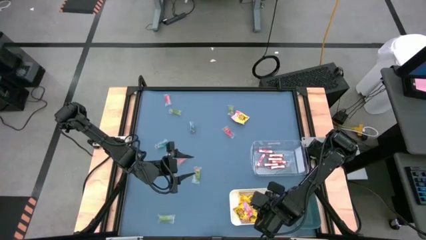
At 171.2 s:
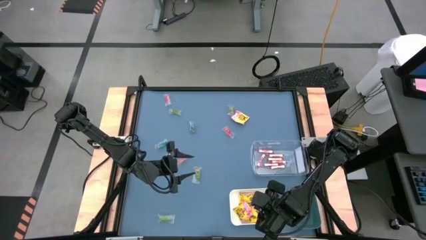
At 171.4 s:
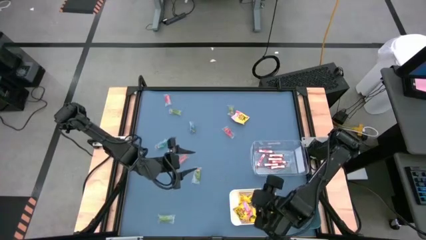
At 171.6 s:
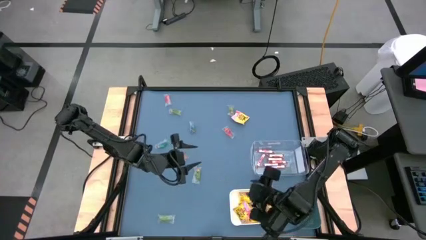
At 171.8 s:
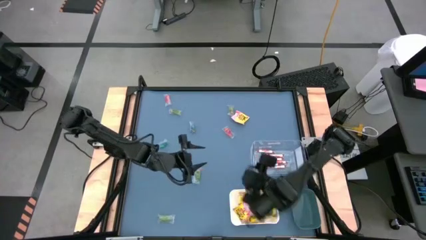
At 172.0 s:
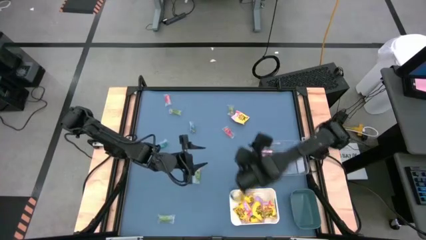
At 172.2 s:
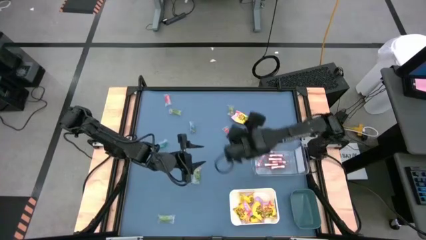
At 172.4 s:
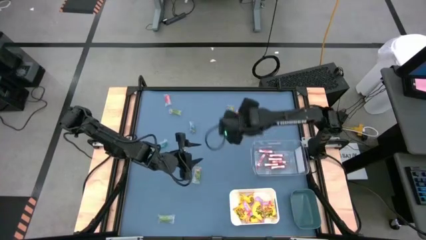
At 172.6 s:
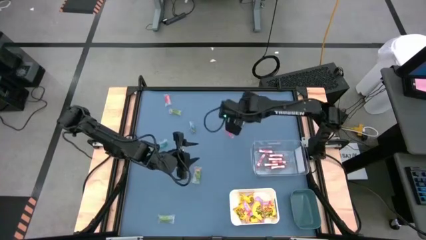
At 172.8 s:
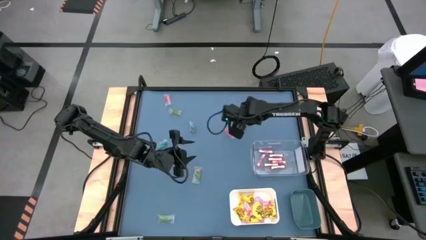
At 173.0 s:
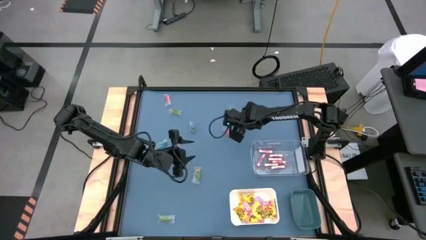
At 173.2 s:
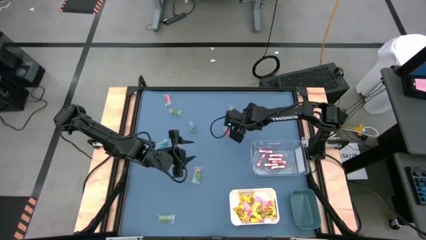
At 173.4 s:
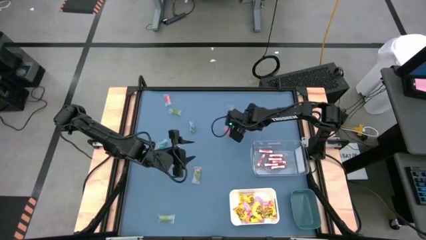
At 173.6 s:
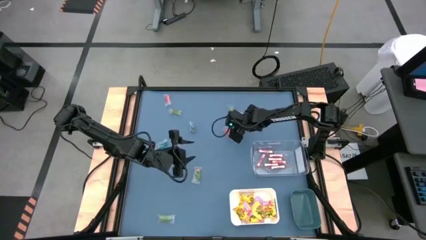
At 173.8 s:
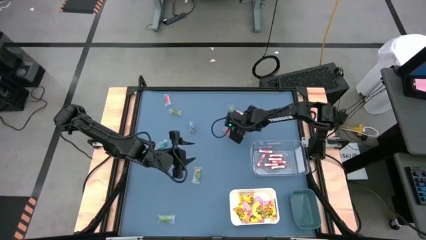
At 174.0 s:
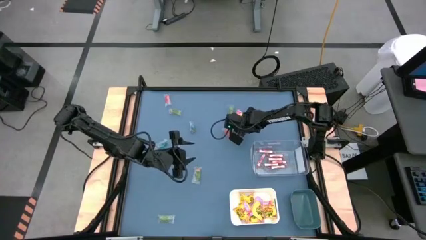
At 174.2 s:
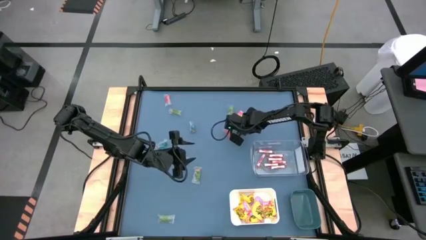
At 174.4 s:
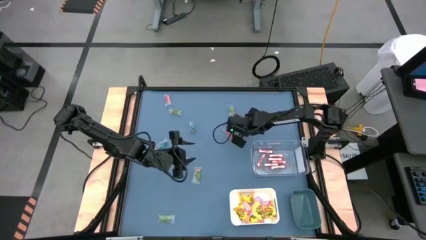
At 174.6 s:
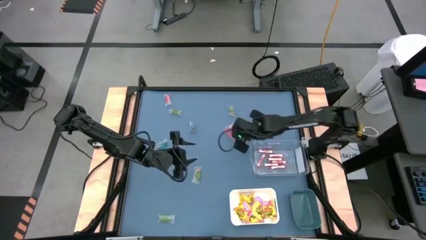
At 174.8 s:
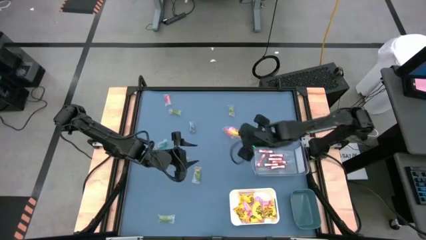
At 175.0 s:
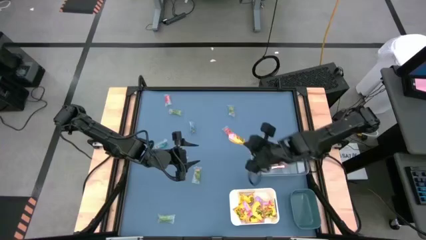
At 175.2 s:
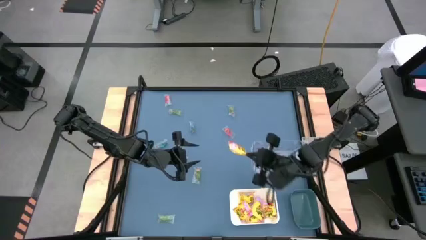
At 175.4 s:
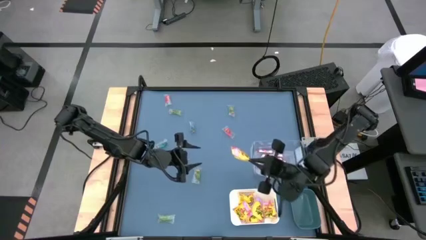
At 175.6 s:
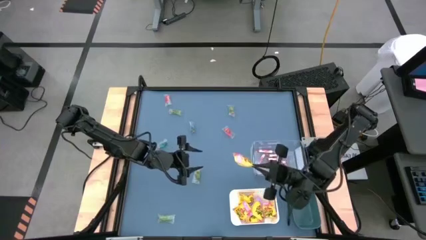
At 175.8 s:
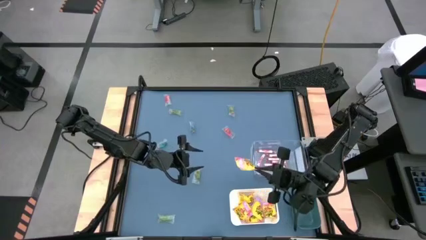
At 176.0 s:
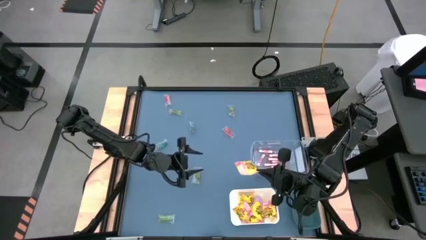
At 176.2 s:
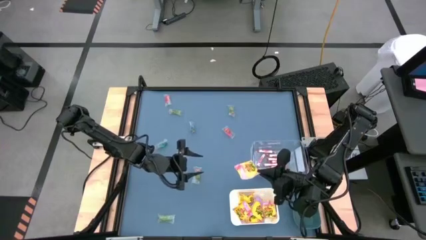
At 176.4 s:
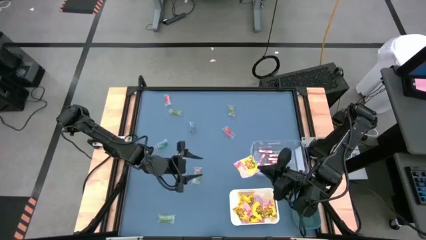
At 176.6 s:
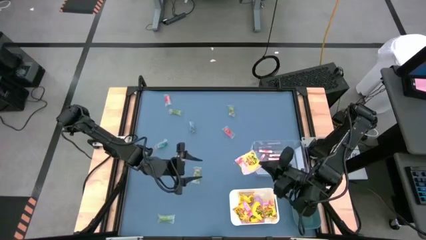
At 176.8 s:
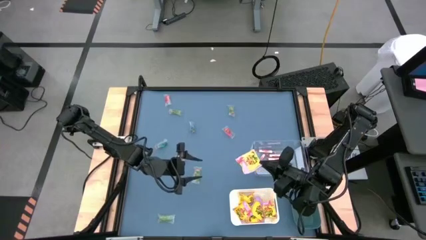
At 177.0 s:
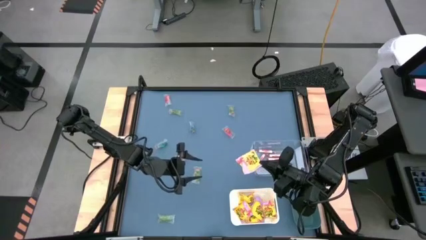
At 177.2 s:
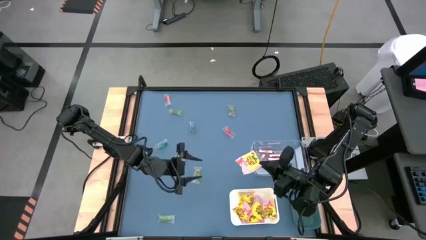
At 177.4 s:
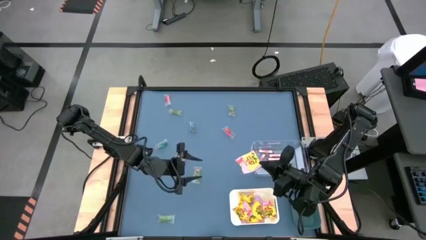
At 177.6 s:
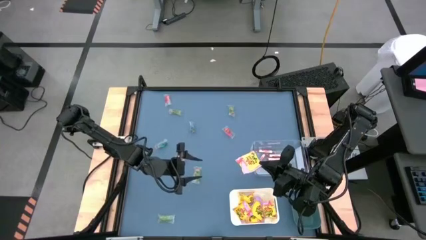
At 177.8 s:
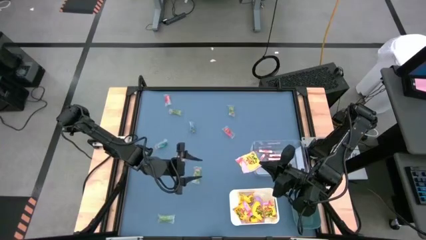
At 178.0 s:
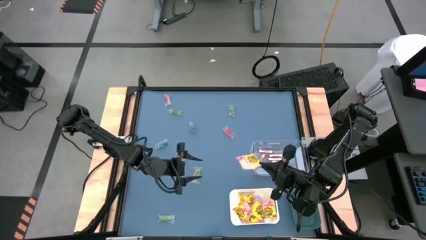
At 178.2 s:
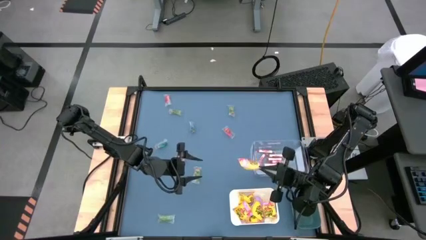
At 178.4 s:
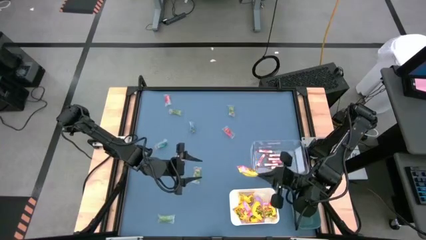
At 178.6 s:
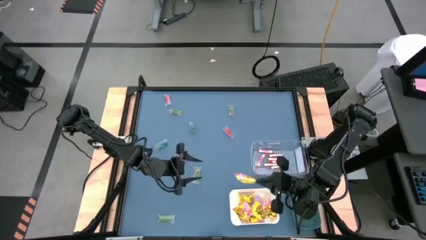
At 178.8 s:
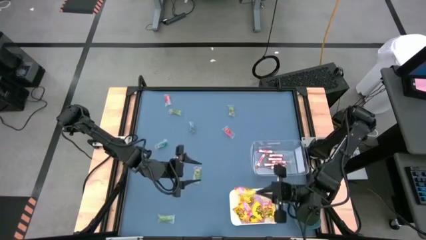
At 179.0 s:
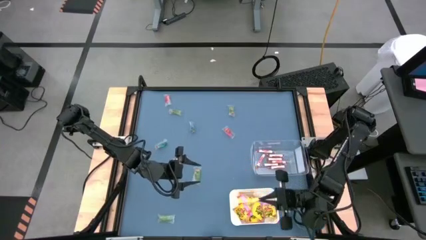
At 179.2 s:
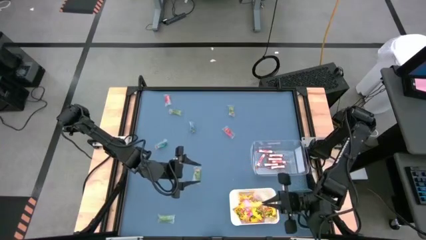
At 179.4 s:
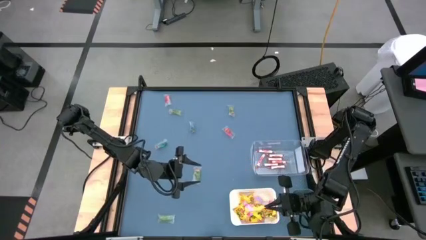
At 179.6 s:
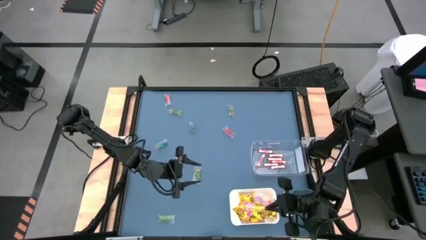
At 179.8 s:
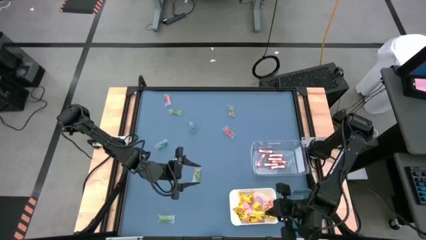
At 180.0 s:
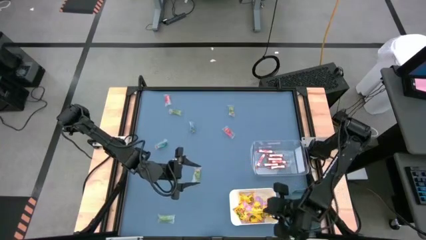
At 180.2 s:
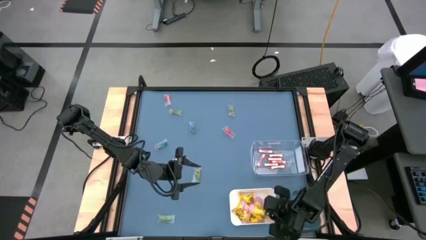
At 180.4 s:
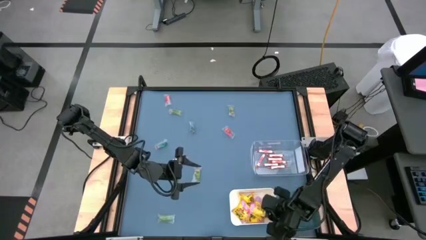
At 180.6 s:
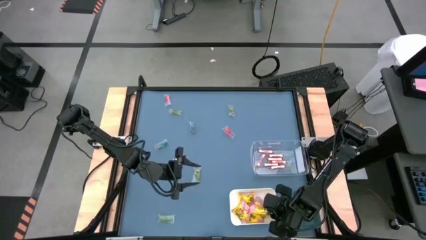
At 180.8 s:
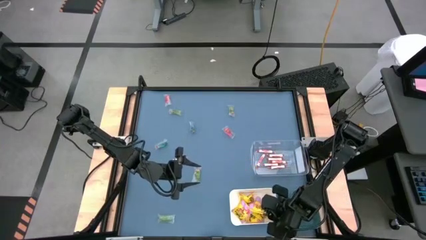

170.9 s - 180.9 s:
Task: Sort candy
Put the yellow candy into the white bin

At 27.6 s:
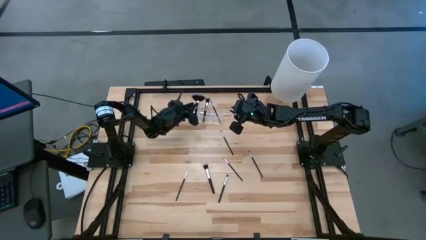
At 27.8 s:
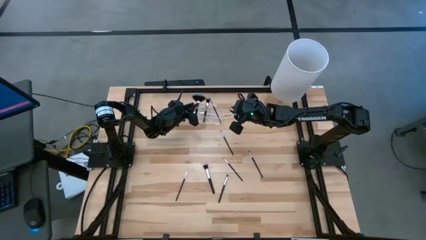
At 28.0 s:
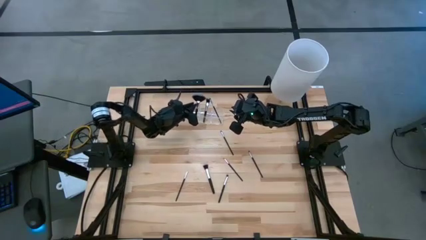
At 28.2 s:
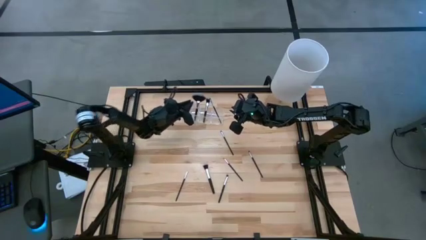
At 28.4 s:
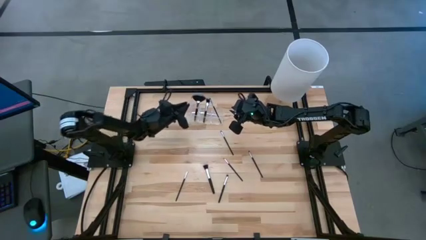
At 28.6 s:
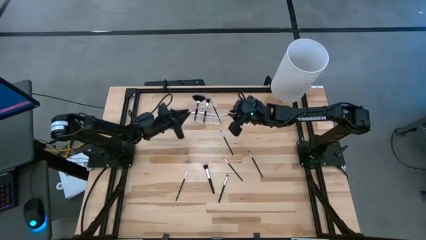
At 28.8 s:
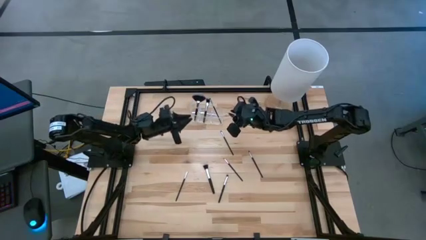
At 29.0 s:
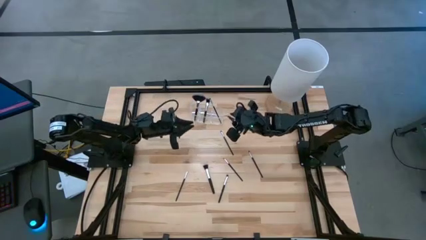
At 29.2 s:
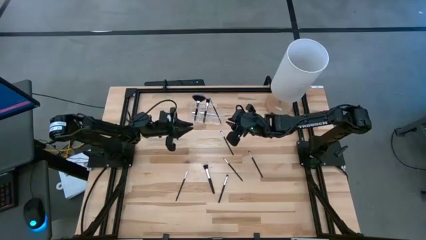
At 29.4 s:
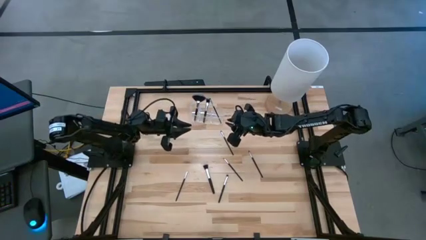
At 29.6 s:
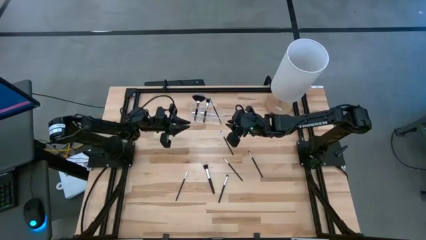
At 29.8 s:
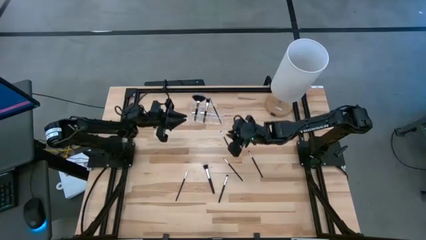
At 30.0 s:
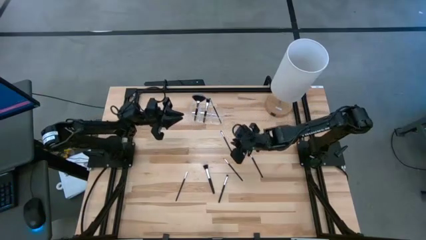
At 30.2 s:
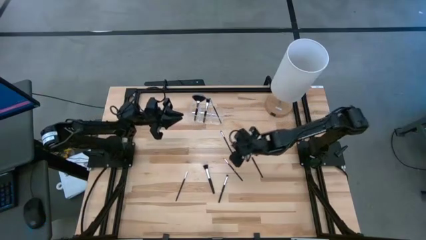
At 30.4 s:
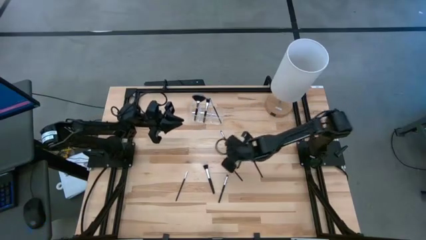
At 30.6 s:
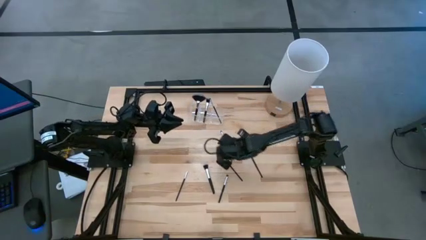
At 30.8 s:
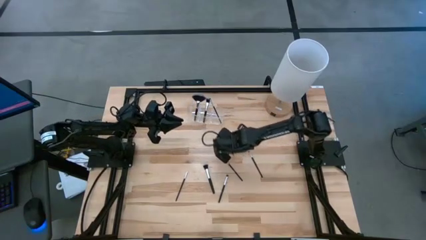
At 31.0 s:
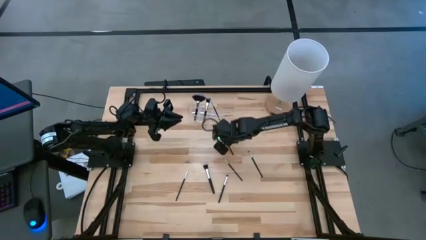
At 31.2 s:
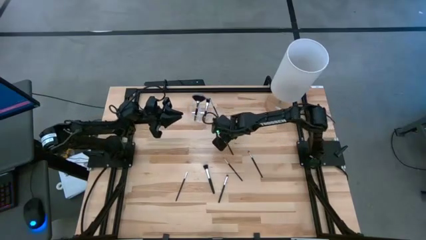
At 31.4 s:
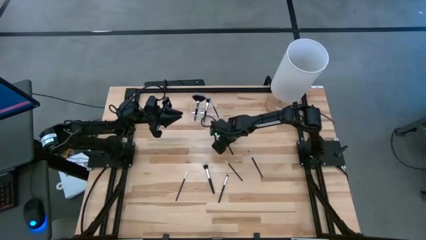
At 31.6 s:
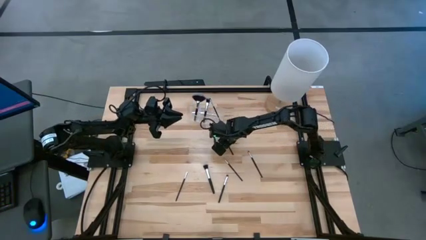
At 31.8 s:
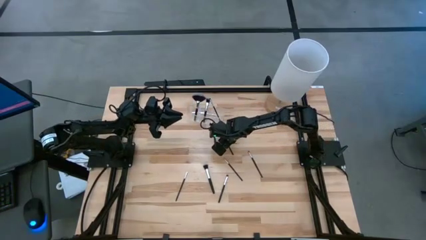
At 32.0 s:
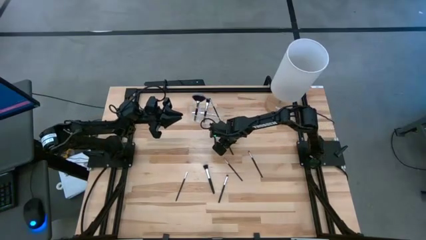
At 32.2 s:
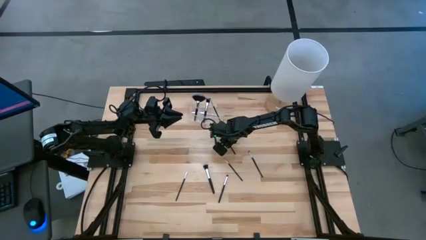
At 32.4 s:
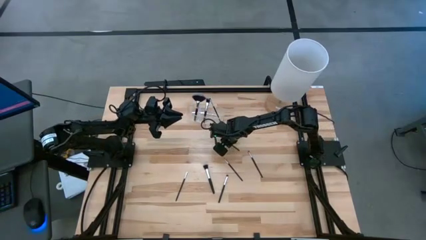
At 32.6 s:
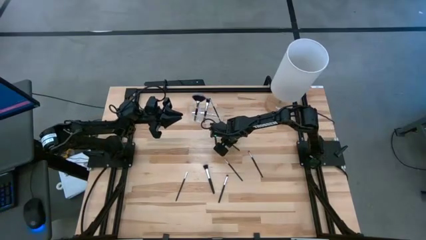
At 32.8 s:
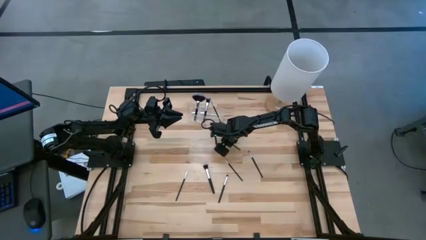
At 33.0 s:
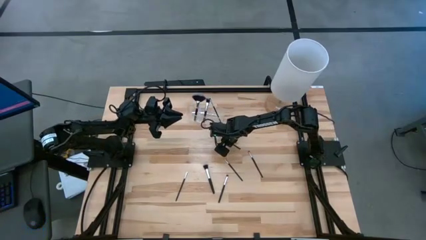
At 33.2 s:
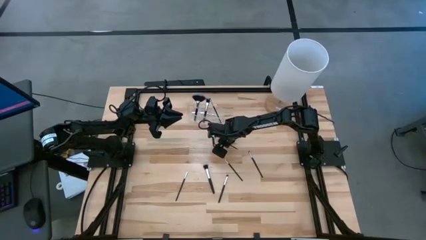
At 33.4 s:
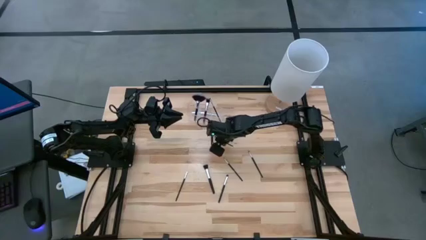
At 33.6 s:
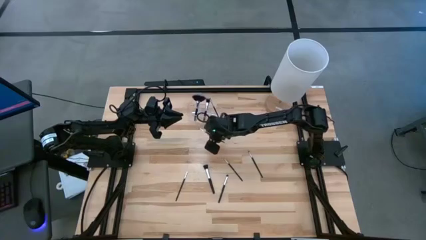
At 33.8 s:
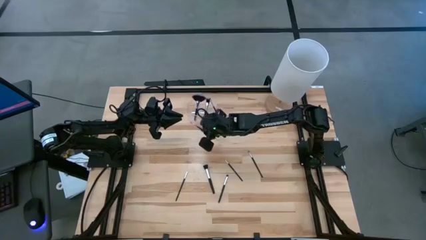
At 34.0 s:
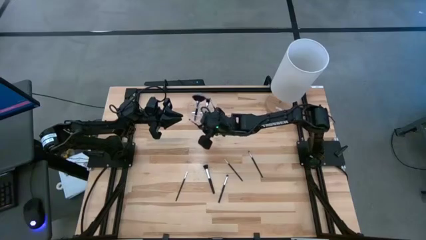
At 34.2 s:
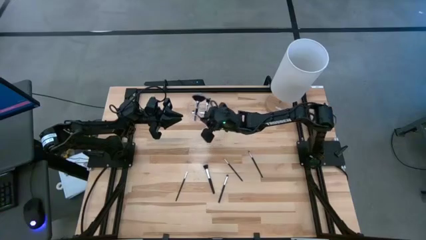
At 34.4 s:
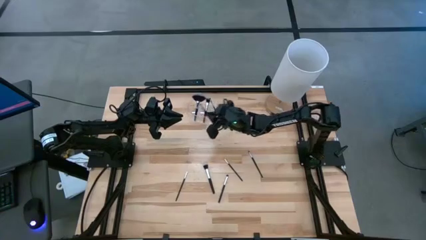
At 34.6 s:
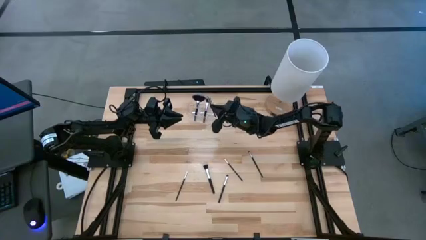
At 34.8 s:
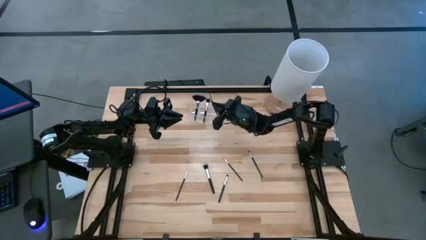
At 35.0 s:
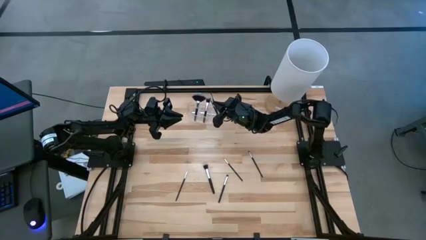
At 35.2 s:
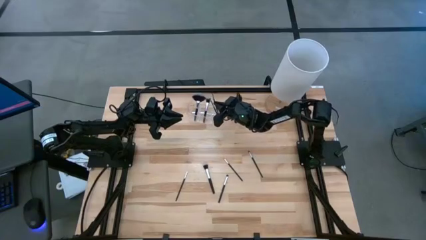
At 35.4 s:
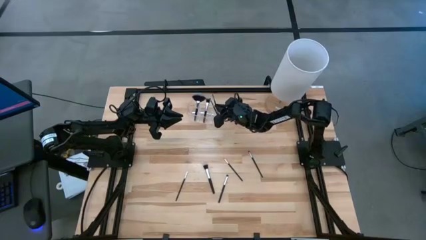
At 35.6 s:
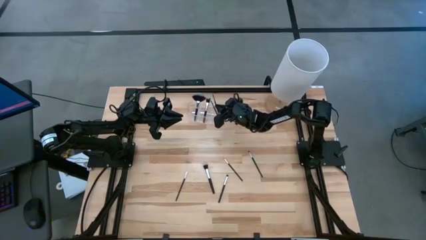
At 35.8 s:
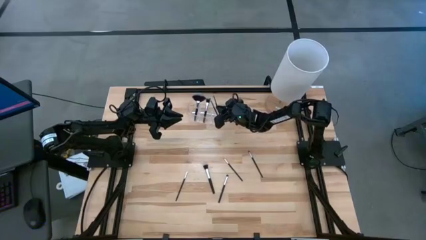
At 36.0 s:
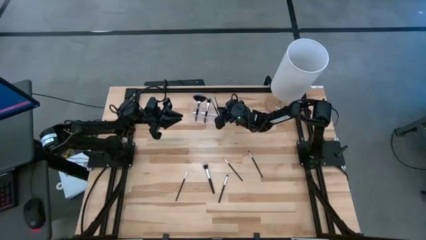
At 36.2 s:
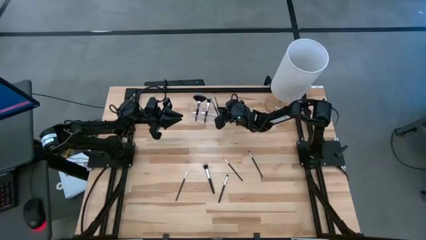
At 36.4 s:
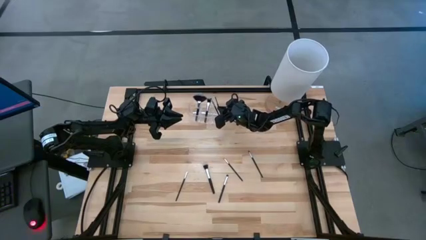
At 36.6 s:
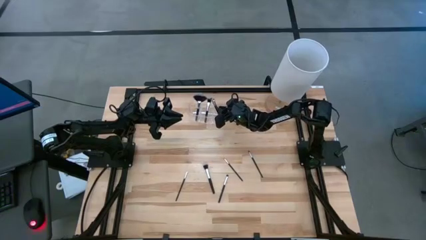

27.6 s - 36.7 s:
Task: Pick & Place Makeup Supplies
Put the makeup brush into the transparent organizer
